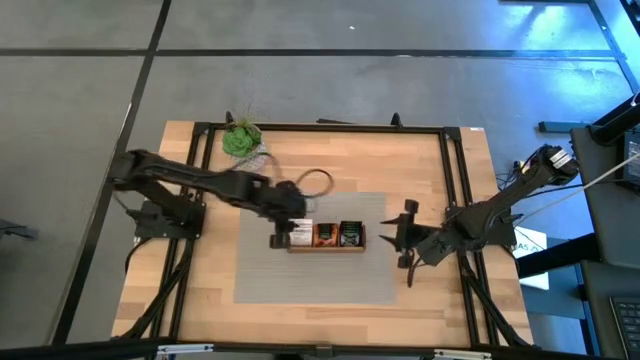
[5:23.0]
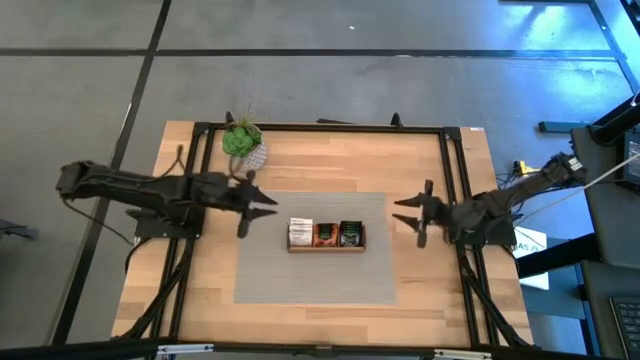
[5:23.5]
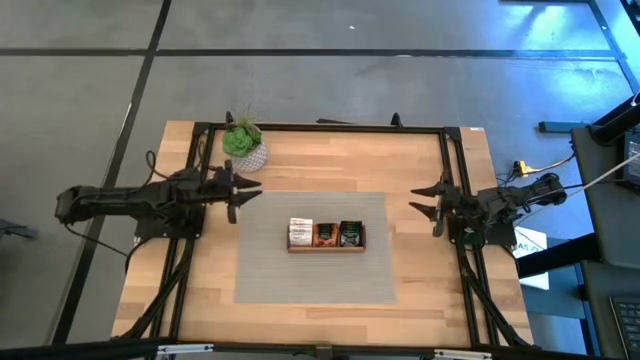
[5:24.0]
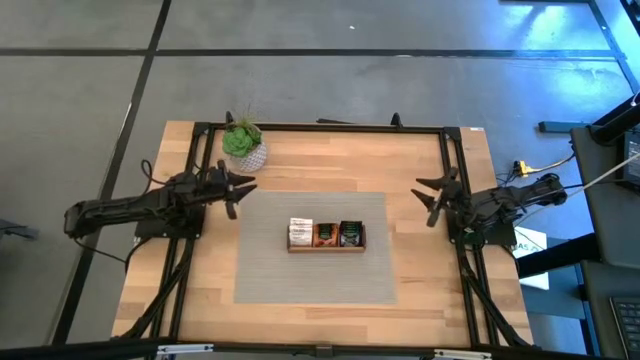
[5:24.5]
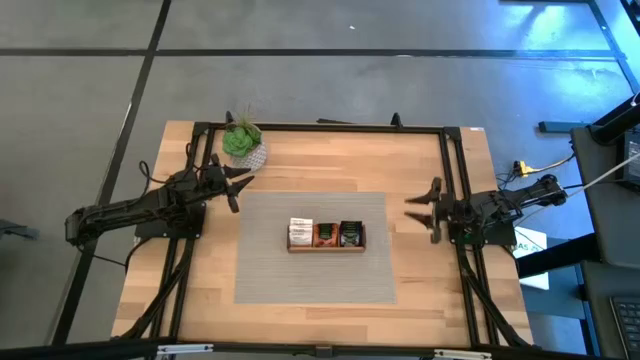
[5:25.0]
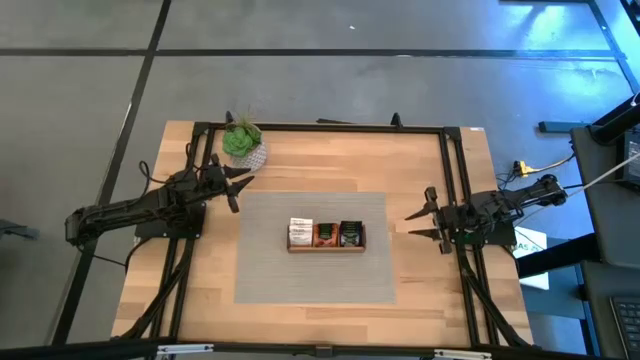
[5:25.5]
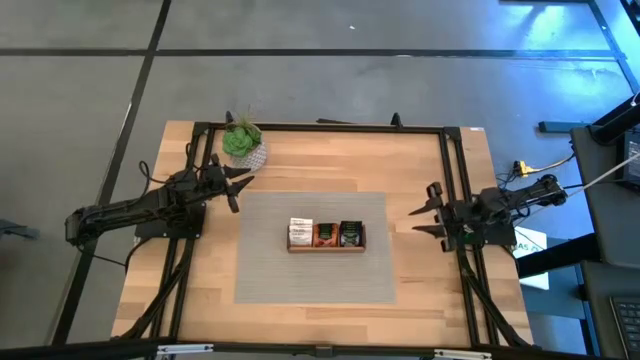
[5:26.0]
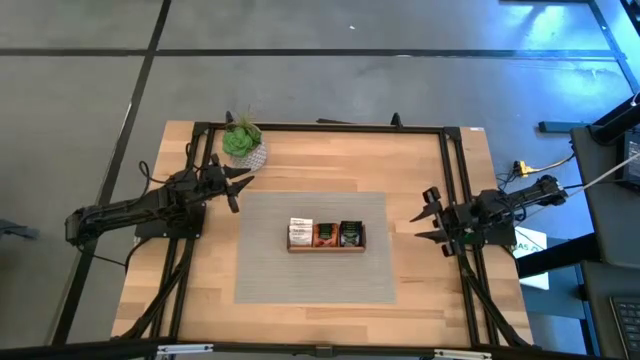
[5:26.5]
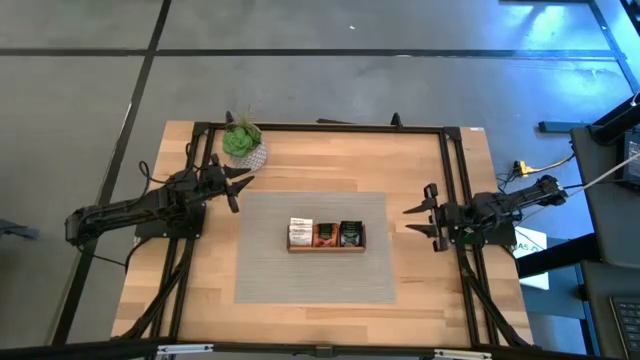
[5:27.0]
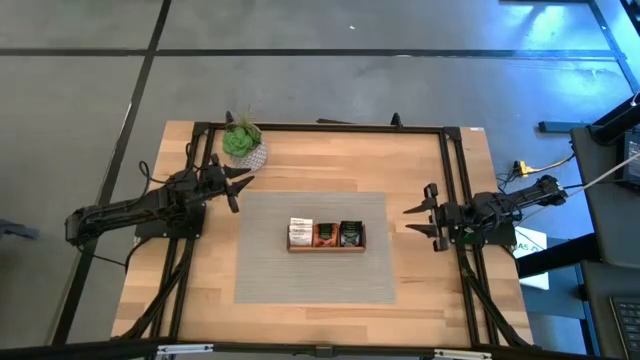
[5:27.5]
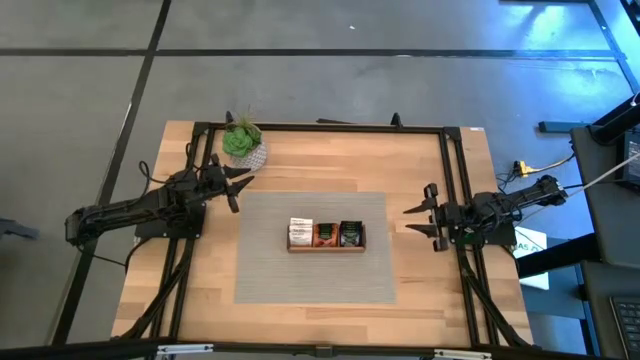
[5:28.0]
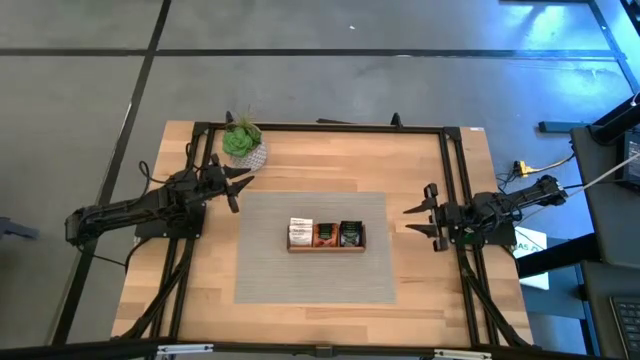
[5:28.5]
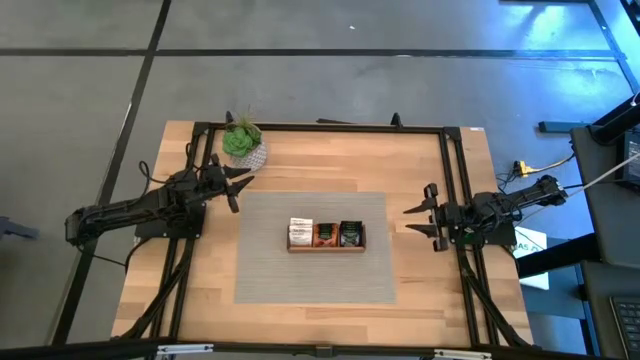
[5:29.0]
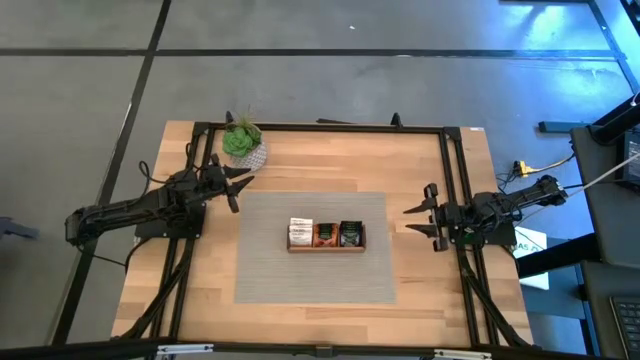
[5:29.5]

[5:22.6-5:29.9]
Task: Pick & Place Tea
Return to Home Position

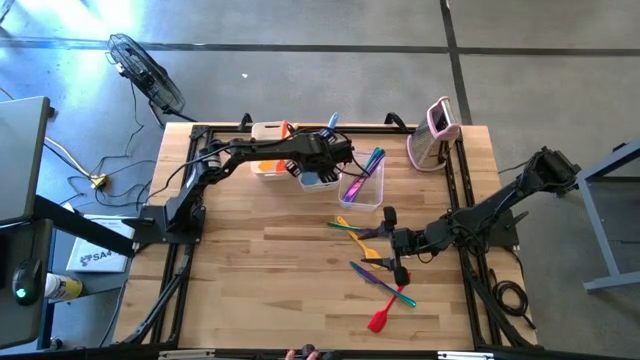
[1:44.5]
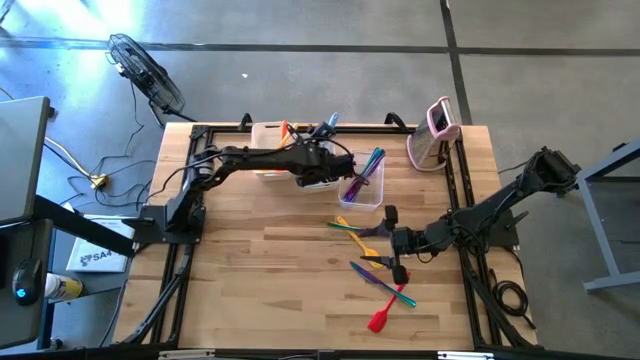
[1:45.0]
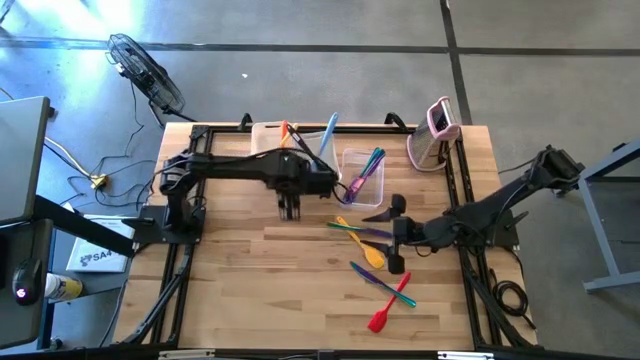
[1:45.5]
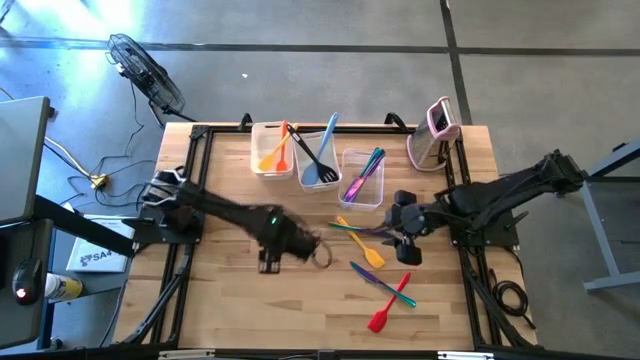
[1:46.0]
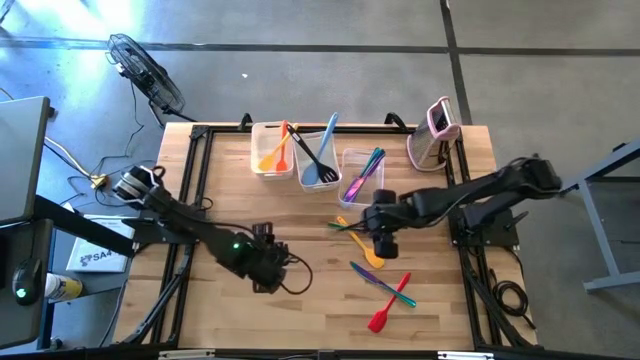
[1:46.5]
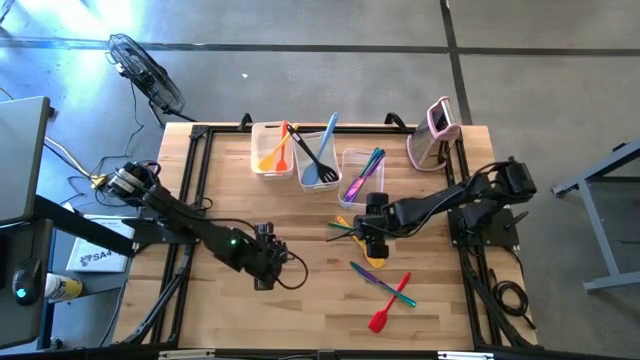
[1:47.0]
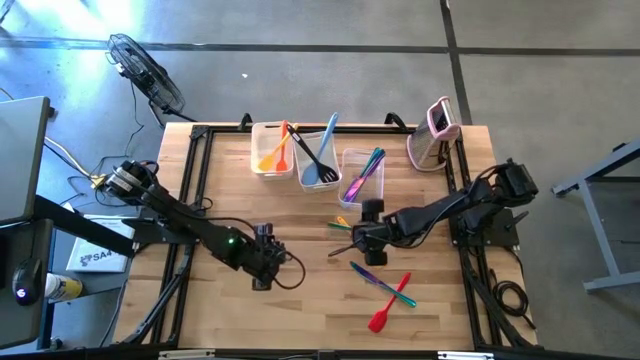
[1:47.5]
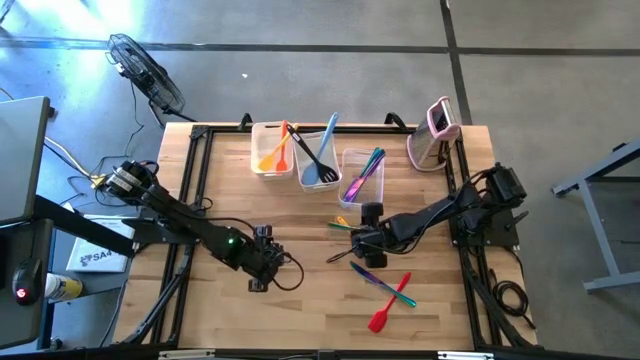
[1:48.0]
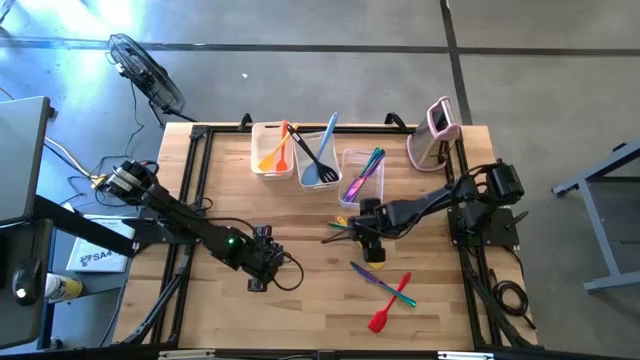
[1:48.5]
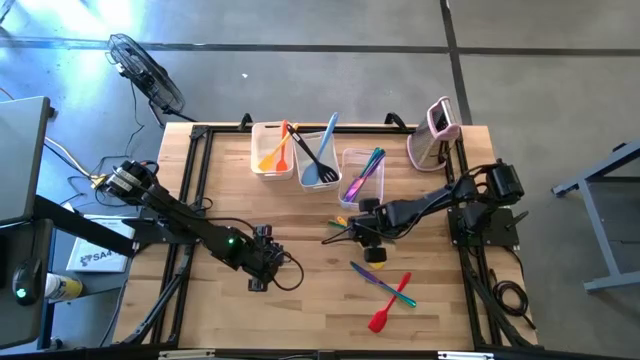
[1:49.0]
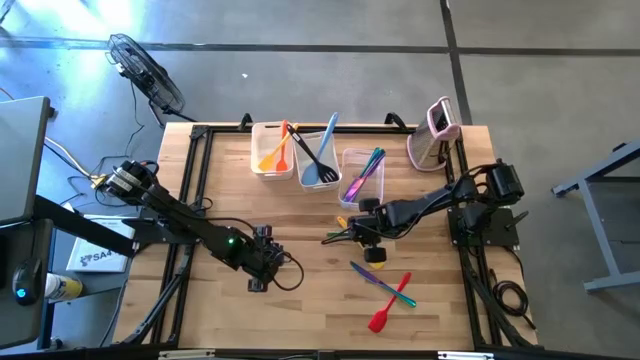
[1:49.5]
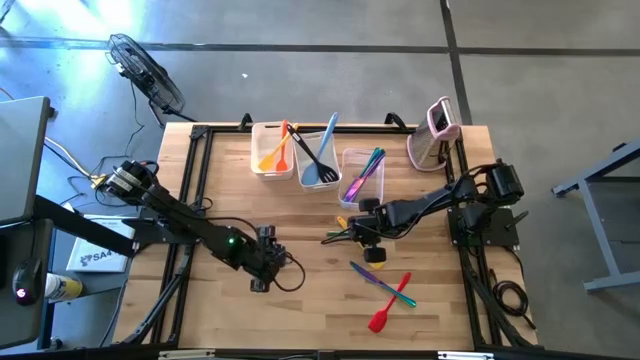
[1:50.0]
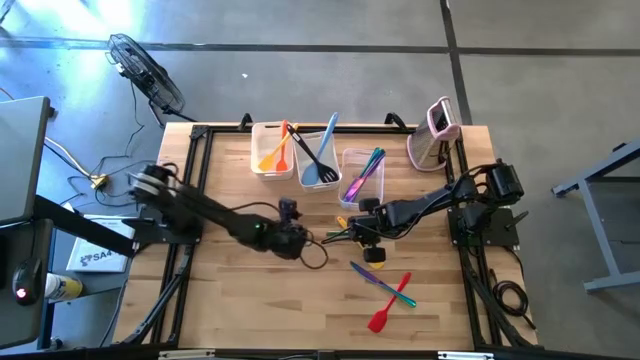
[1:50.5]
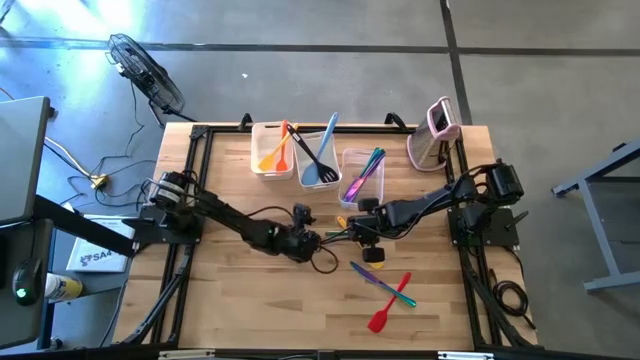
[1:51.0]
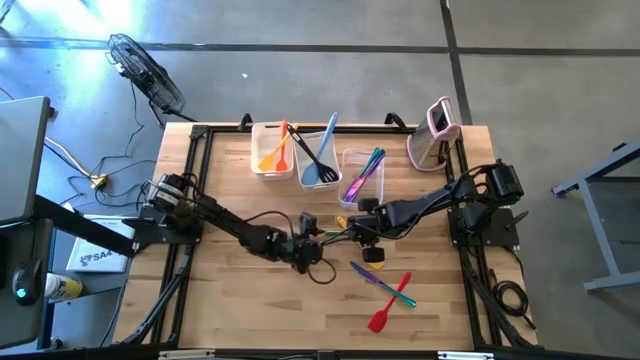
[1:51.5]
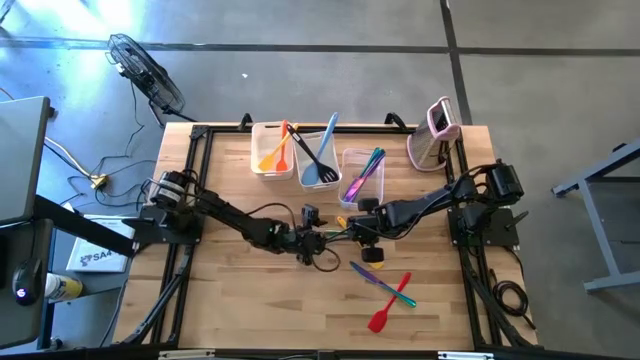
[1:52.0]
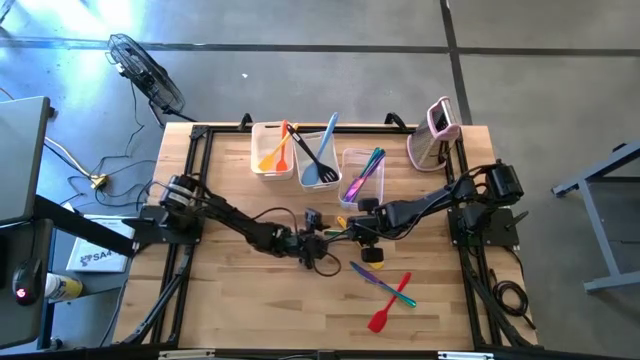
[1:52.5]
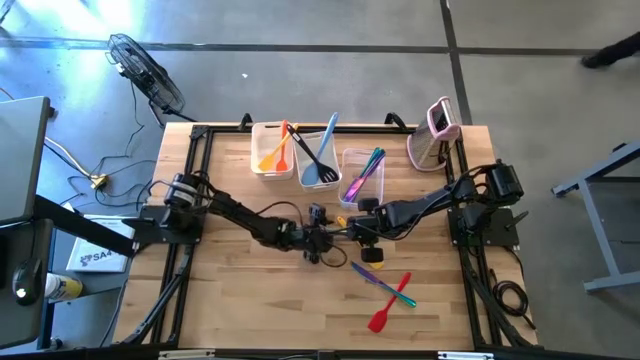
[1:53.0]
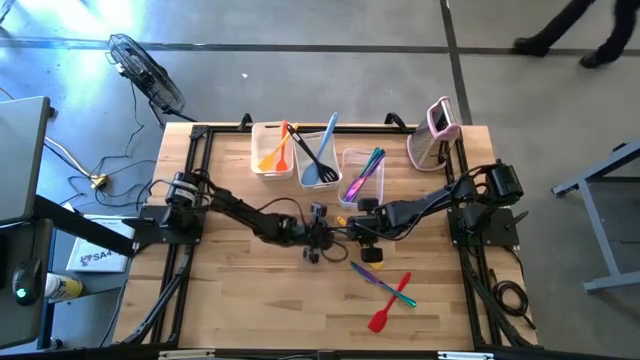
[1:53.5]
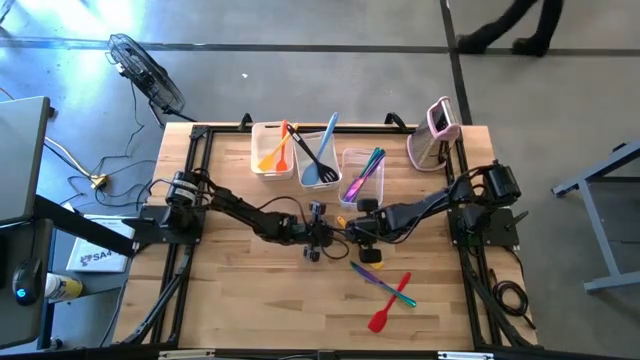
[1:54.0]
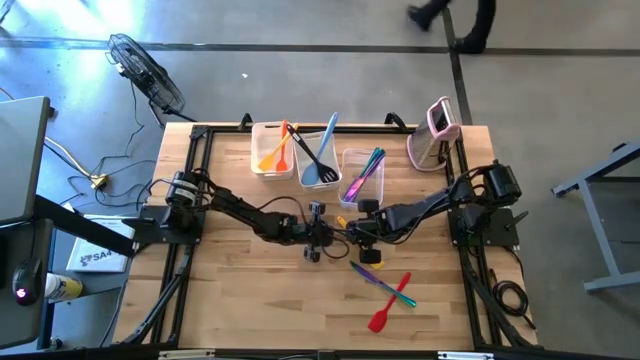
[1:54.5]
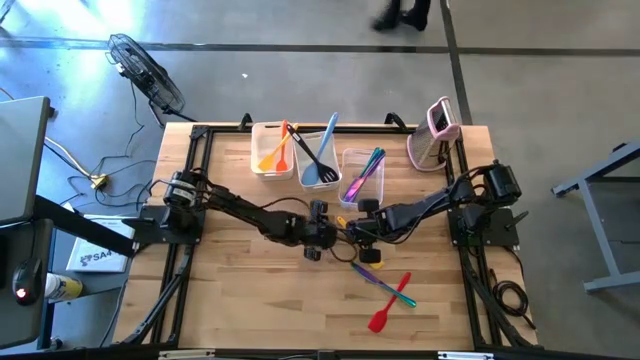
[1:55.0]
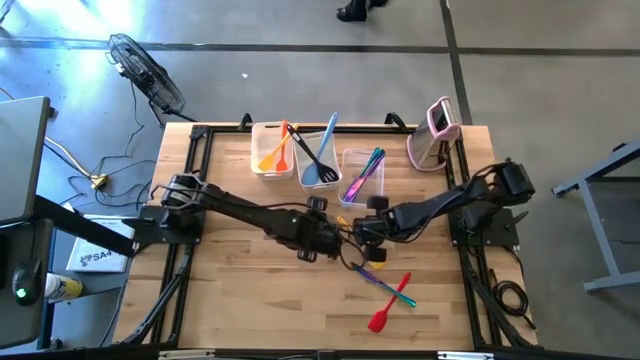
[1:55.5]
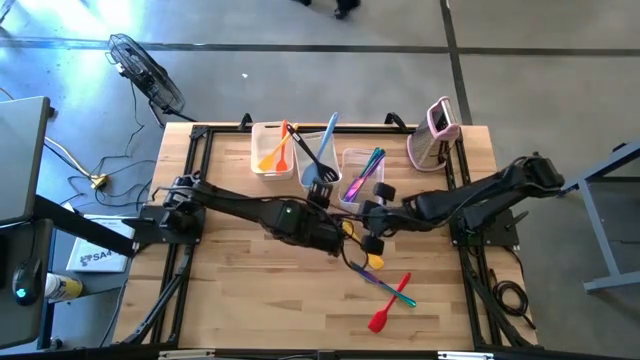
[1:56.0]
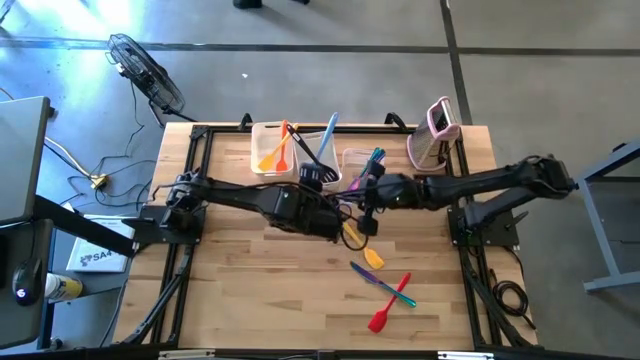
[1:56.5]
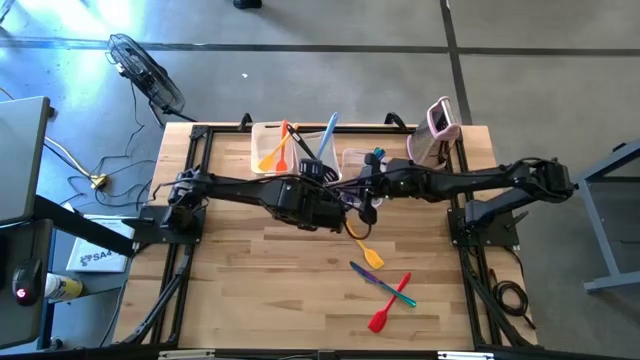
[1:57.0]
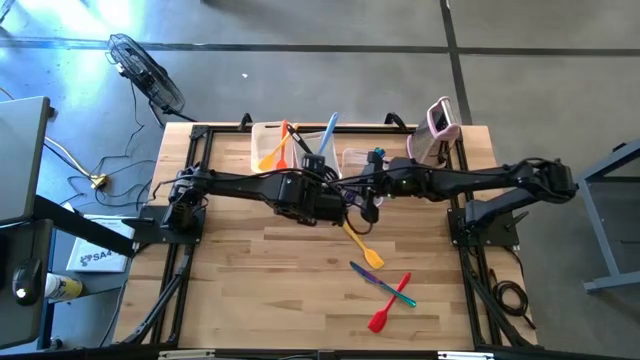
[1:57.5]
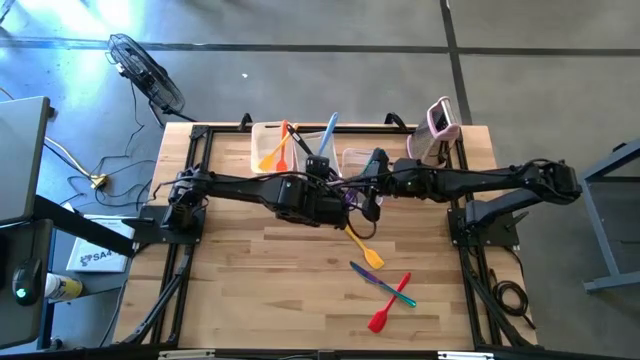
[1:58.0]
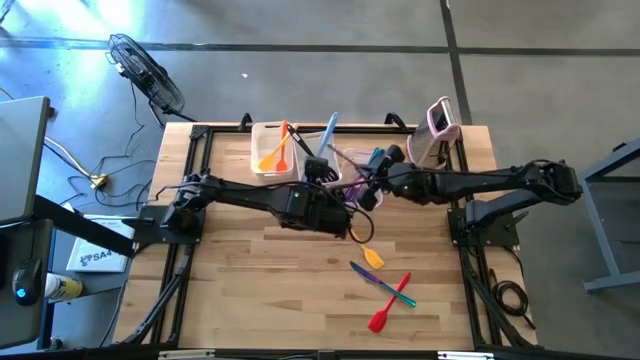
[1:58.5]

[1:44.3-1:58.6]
Task: Pick & Place Kitchen Items
Put the purple table knife into the transparent bin
